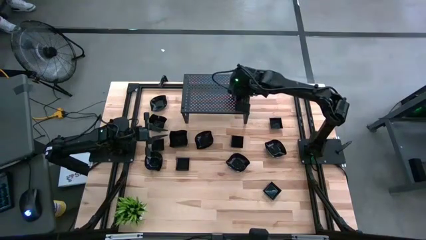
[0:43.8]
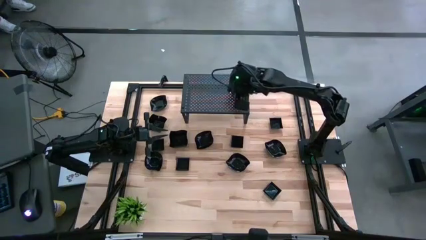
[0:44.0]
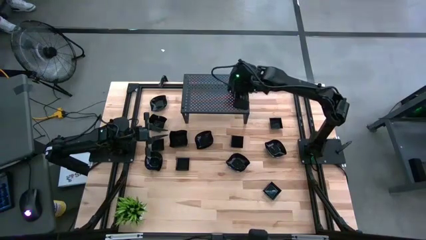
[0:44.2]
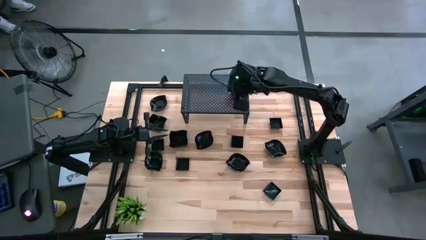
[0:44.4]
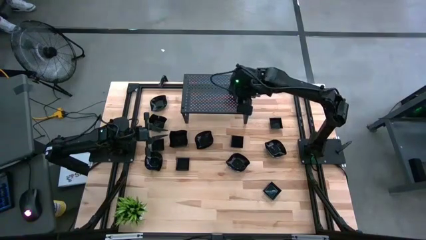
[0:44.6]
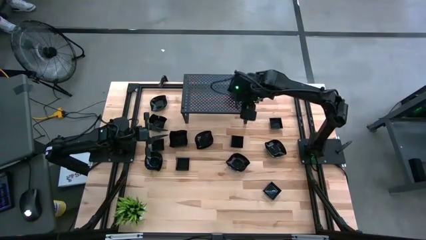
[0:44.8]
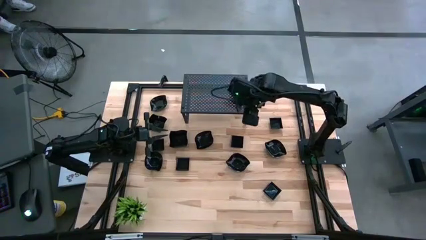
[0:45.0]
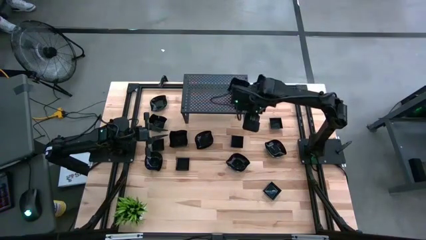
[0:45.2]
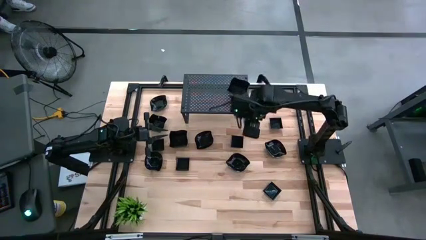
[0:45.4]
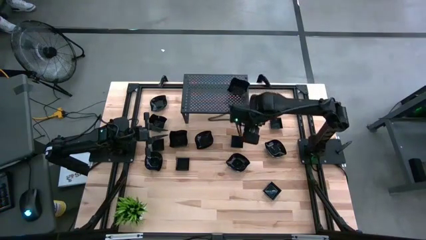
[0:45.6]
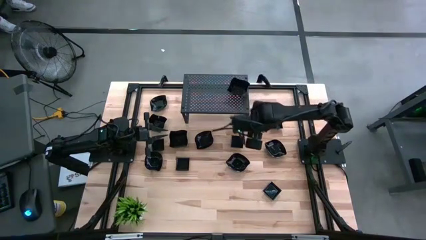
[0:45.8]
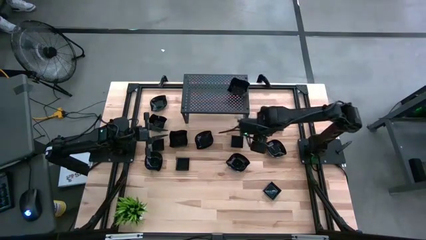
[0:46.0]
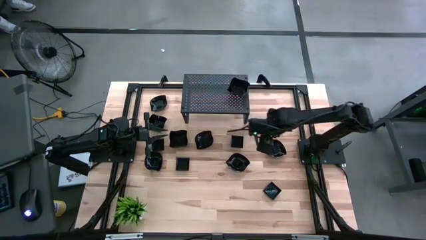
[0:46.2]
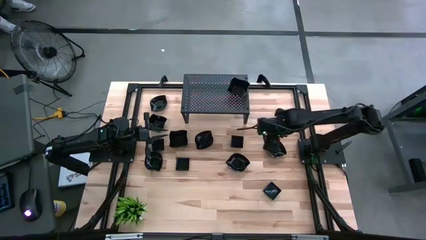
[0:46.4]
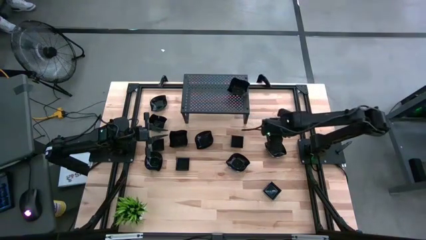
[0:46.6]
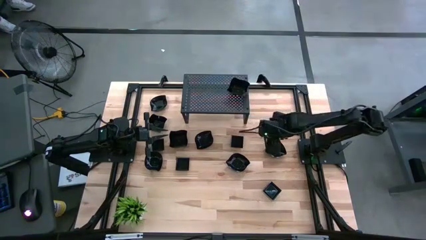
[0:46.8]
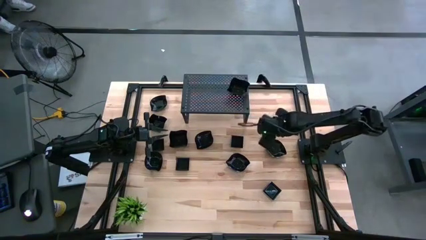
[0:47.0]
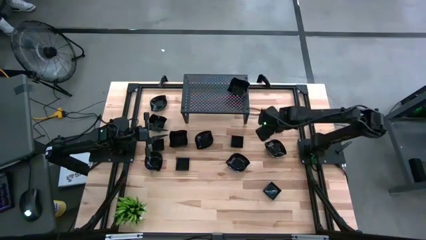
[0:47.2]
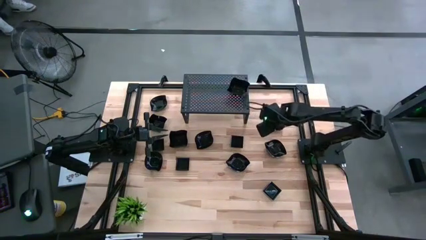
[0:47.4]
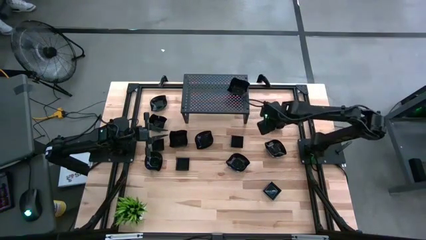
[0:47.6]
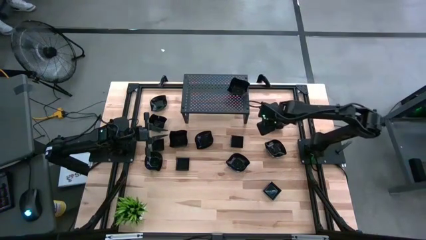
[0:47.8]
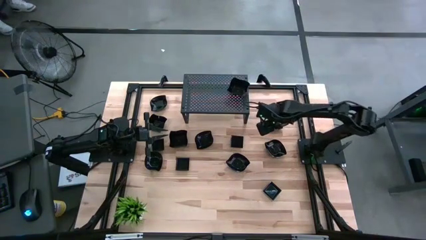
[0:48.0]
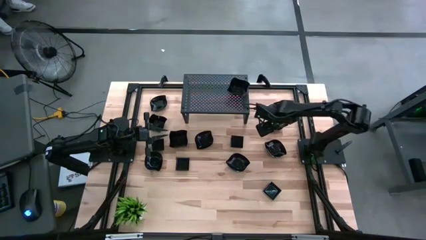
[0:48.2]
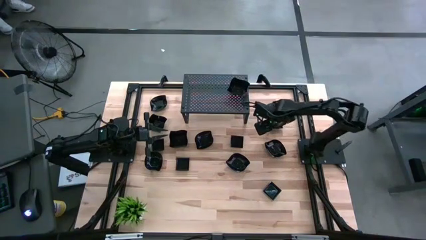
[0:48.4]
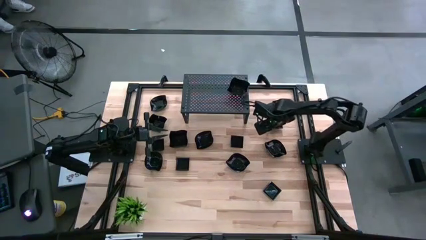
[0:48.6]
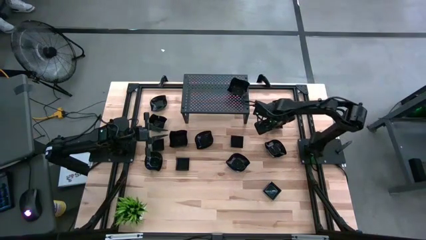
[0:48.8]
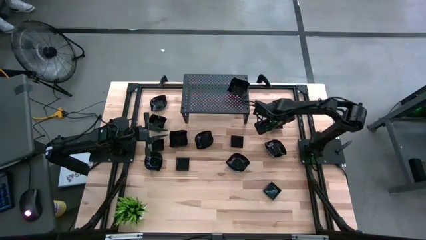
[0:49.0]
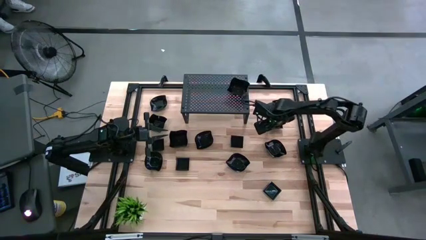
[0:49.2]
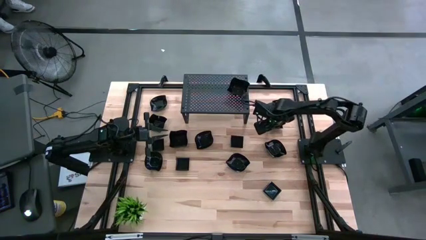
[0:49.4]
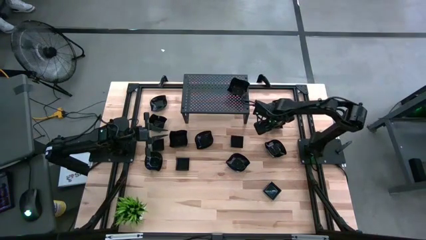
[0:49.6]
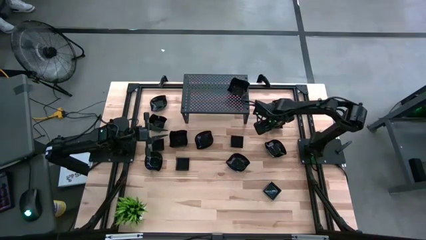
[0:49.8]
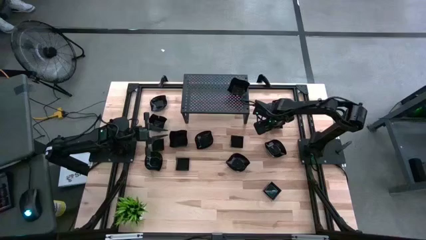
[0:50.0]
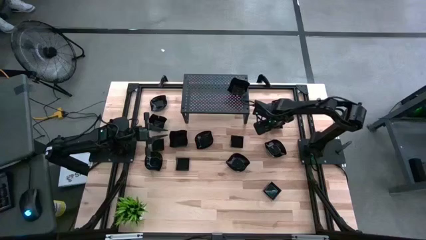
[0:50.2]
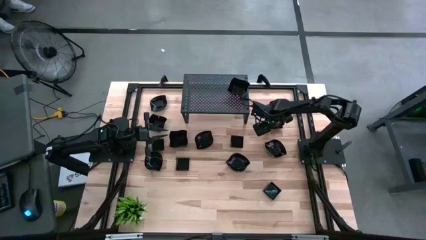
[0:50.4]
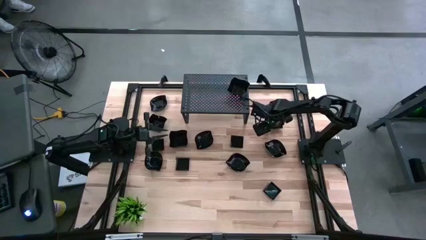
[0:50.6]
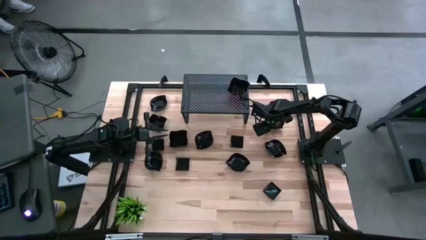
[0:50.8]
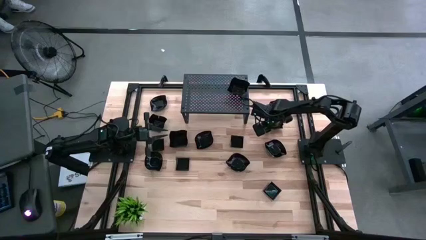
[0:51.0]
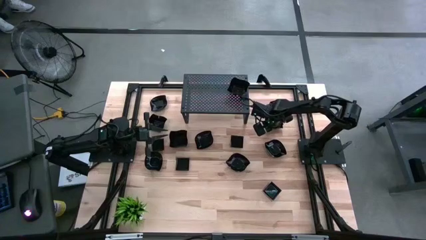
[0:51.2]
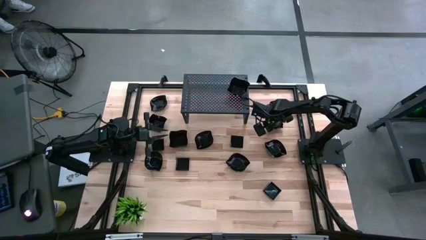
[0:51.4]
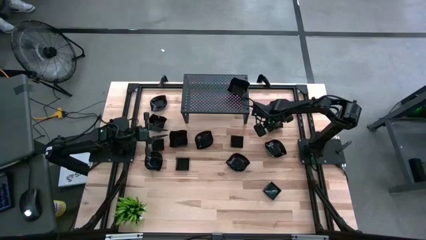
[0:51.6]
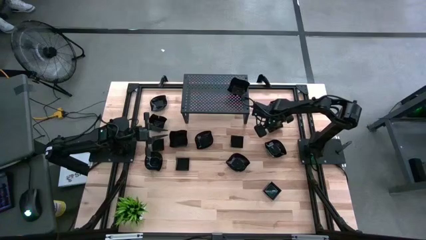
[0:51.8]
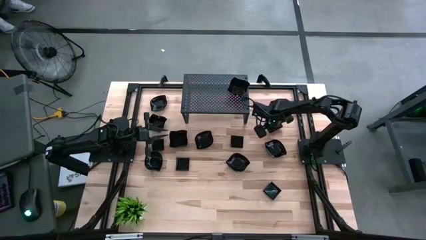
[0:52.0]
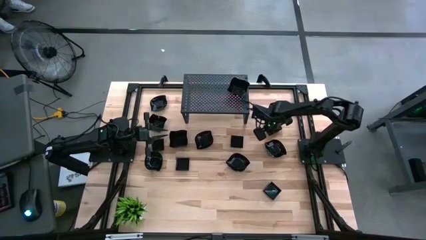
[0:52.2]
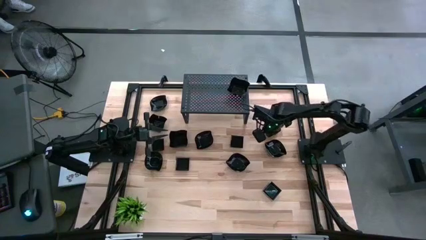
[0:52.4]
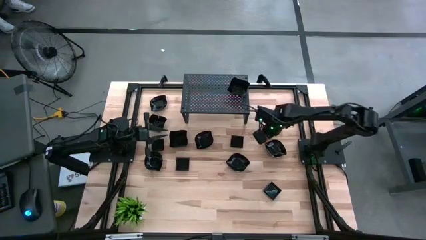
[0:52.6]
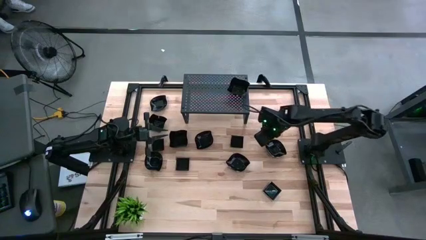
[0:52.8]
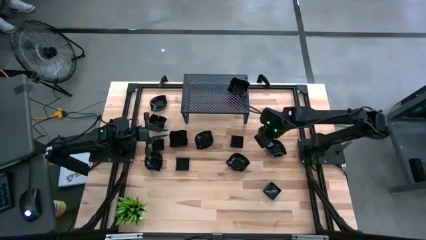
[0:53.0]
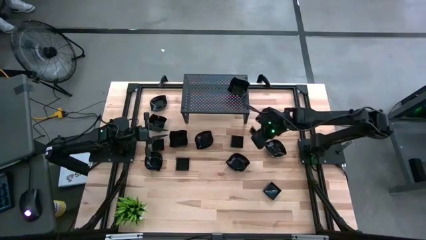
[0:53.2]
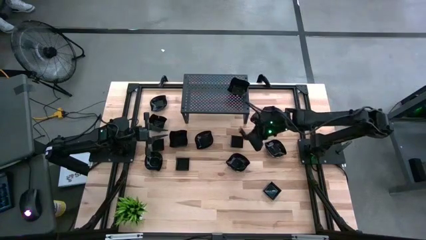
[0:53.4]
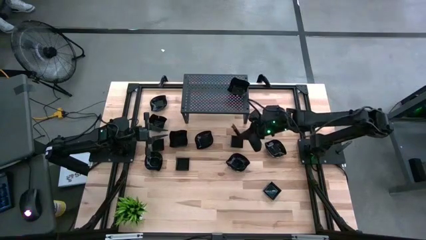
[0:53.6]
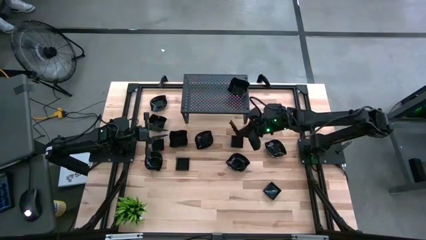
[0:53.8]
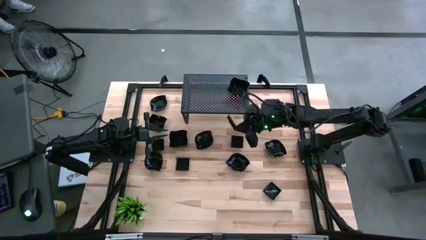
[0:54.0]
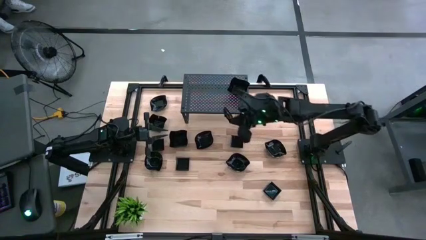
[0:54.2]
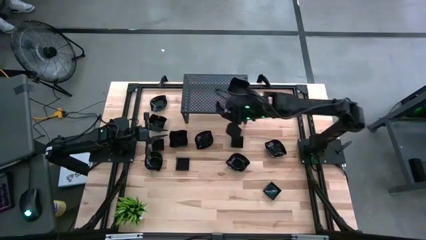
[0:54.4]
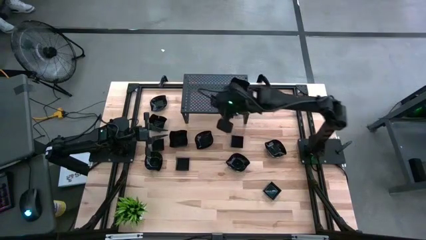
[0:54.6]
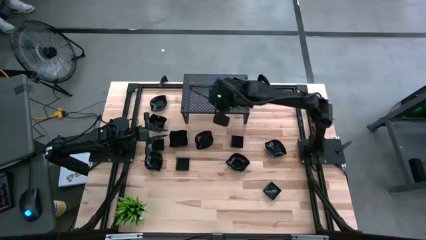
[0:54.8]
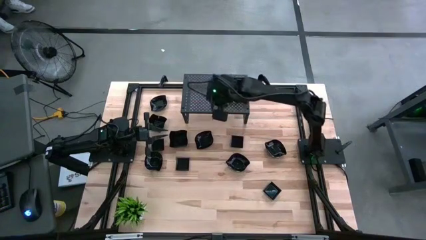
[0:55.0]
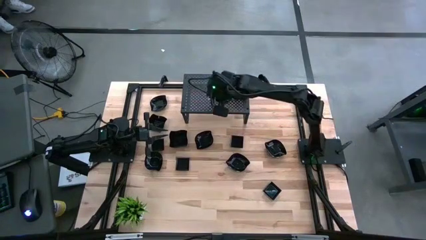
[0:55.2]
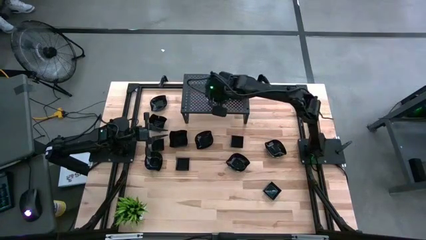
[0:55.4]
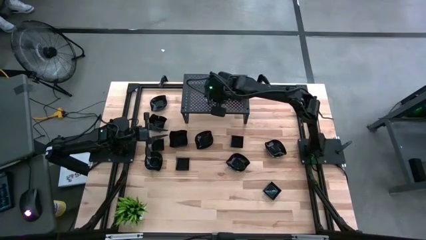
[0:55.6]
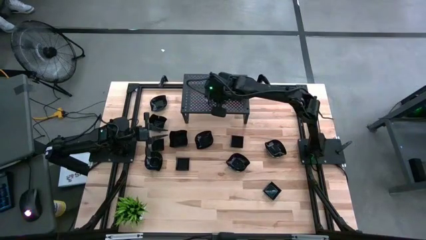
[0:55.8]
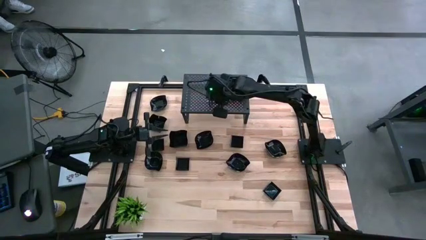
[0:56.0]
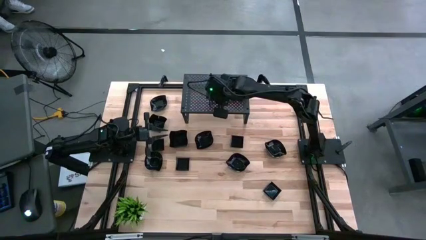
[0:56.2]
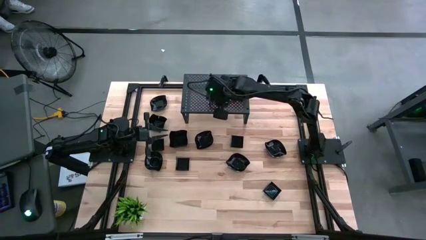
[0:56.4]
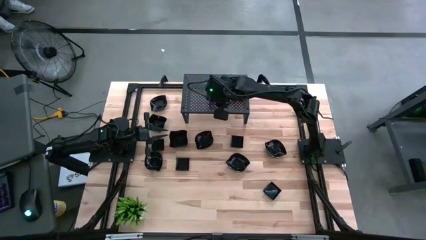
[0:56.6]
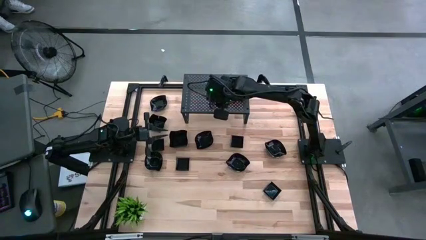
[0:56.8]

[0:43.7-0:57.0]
Task: Pick & Place Mini shaped plates
Put the black square plate on the shelf

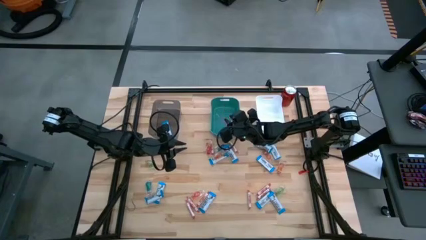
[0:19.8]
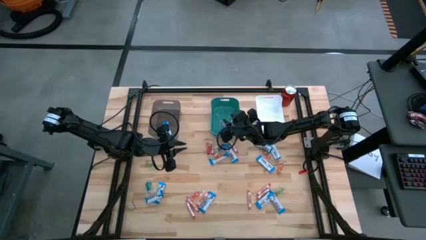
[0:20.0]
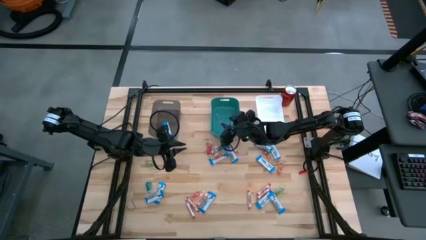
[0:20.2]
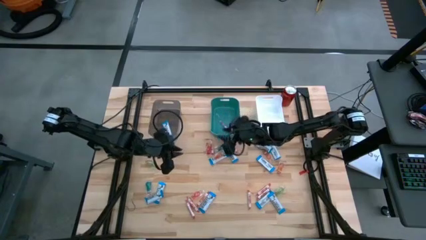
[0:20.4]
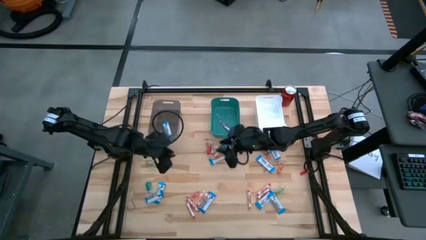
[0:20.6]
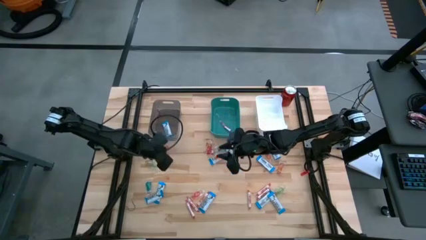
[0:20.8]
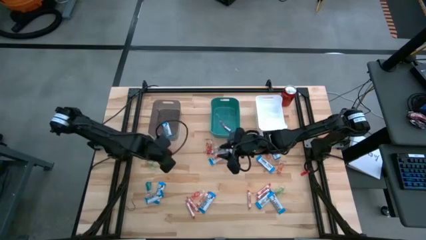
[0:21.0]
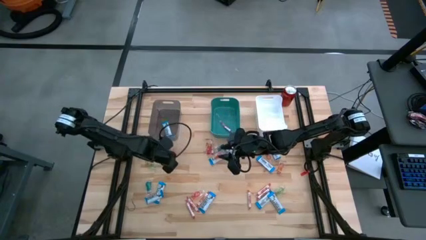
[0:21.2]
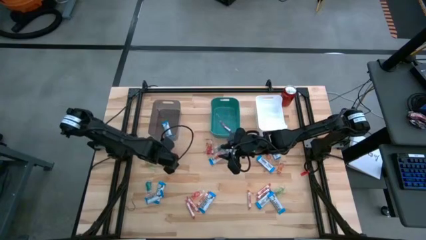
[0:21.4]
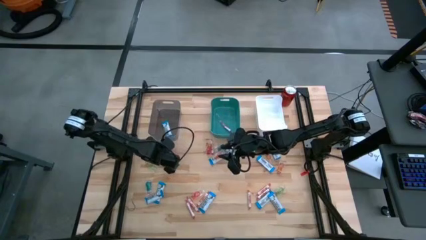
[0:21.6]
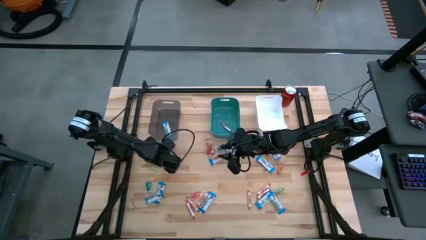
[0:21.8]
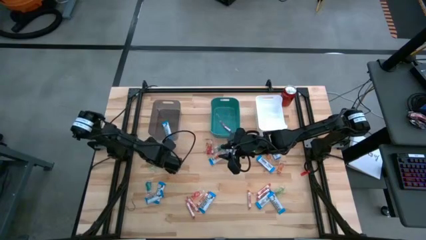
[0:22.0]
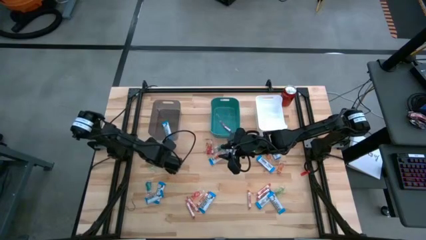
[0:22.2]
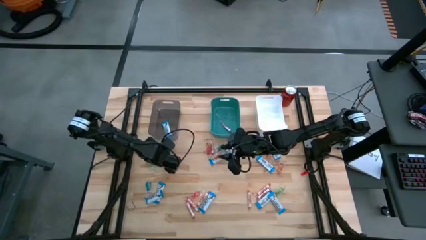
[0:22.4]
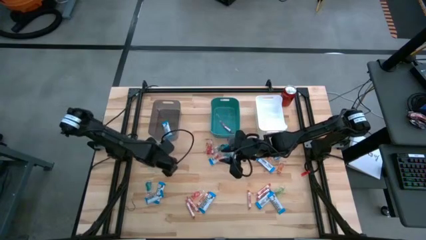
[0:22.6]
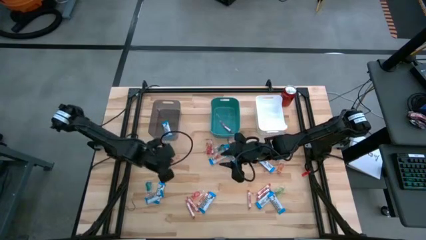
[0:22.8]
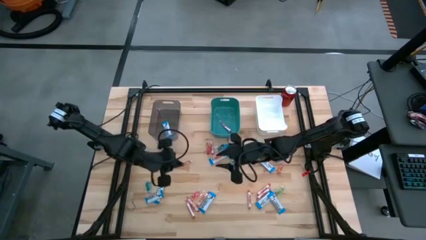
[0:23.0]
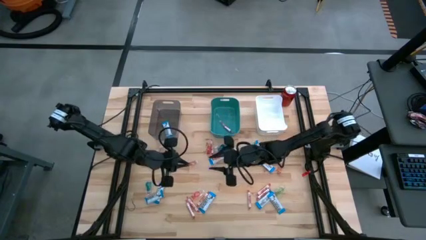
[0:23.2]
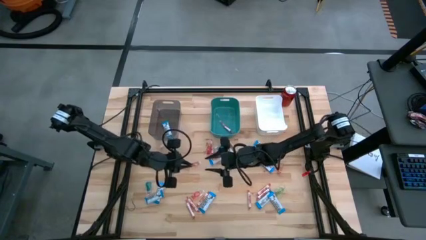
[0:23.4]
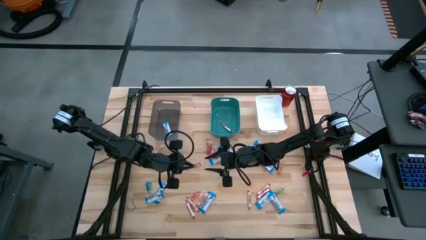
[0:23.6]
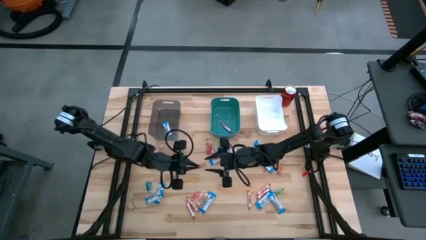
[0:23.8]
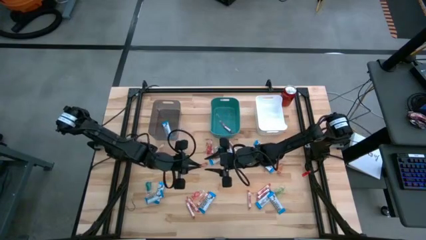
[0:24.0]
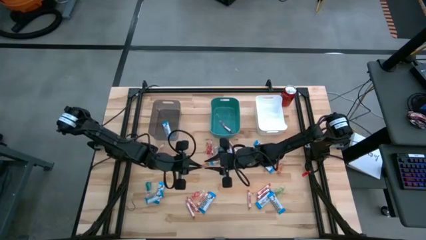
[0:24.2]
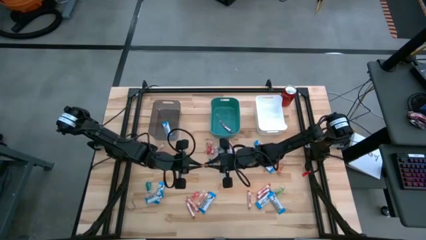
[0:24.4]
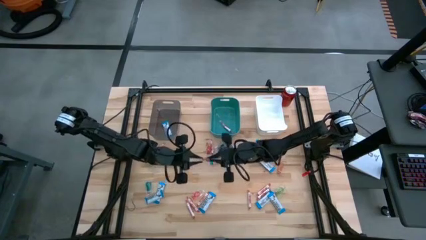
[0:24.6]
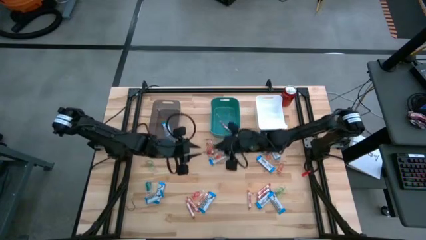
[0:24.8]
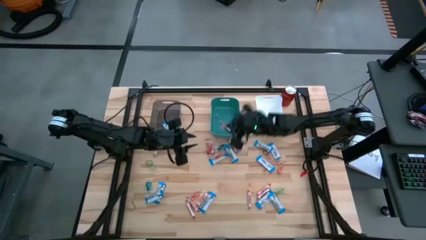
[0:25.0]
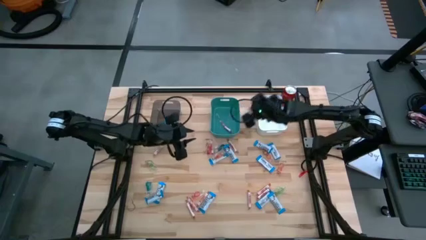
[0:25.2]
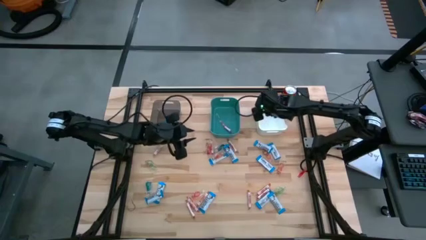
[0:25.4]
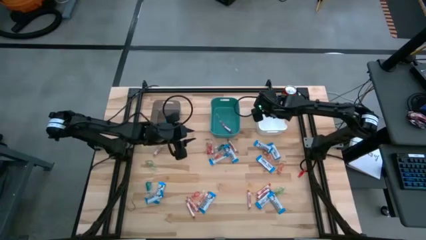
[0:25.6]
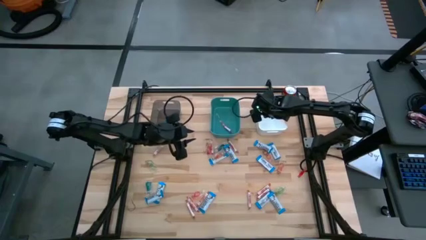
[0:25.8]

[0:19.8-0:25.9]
Task: Sort candy
Put the orange gummy into the white bin
